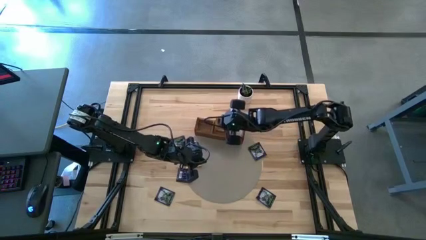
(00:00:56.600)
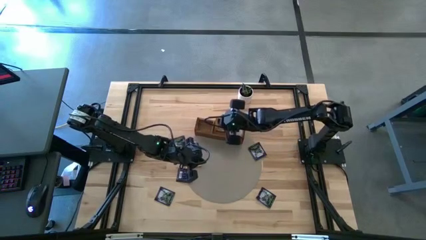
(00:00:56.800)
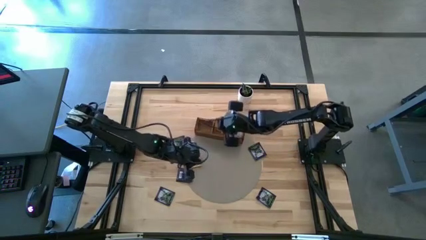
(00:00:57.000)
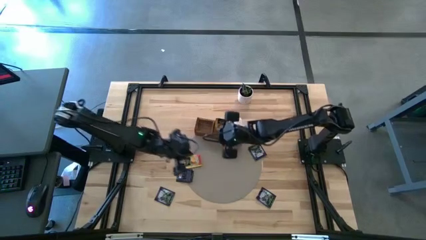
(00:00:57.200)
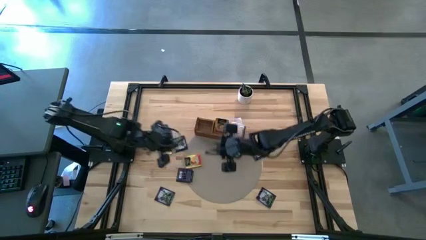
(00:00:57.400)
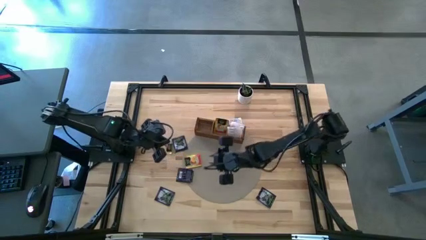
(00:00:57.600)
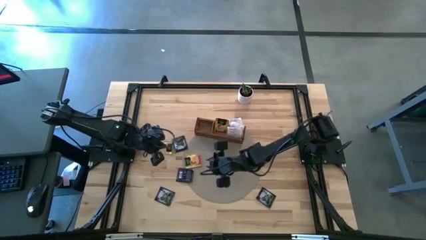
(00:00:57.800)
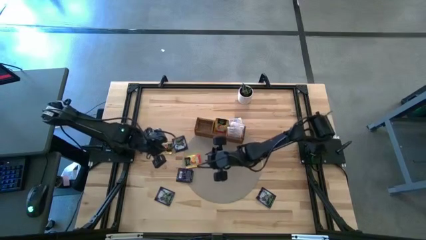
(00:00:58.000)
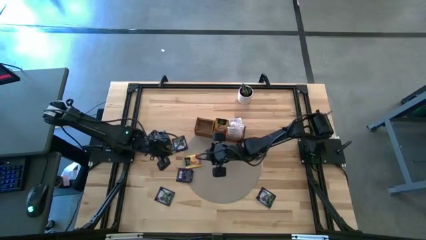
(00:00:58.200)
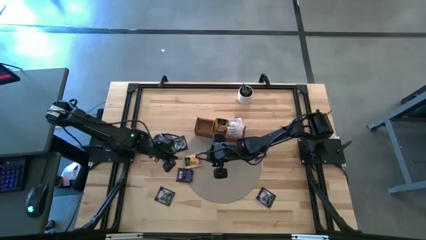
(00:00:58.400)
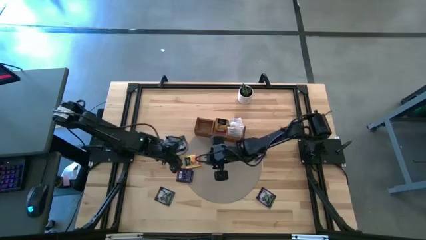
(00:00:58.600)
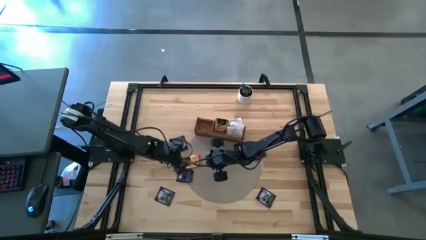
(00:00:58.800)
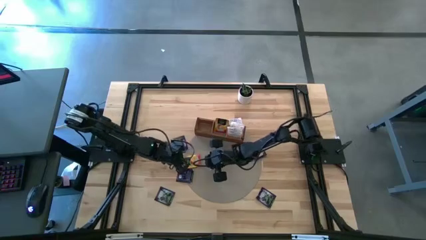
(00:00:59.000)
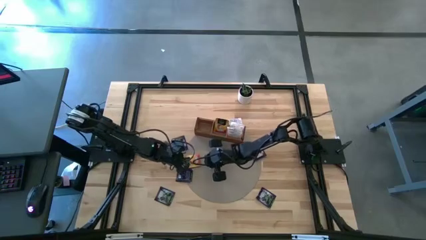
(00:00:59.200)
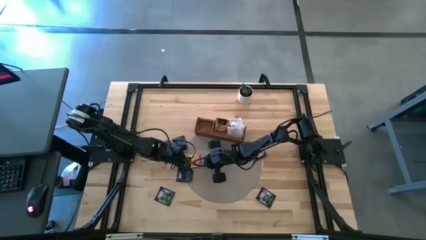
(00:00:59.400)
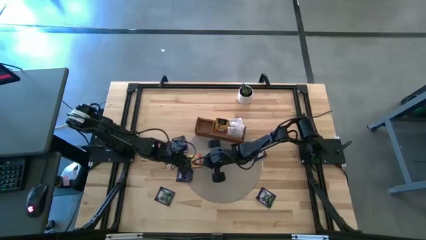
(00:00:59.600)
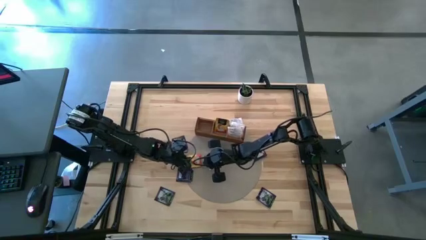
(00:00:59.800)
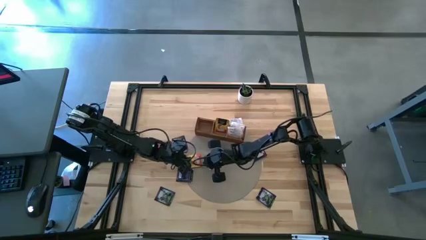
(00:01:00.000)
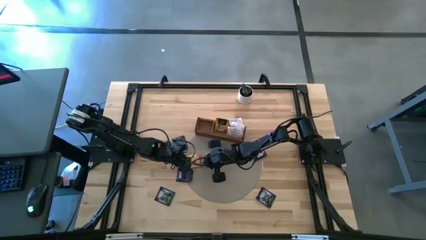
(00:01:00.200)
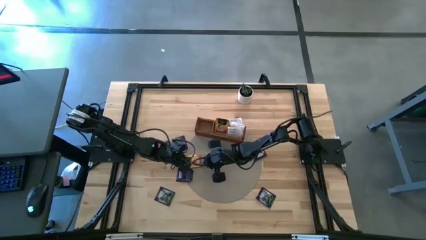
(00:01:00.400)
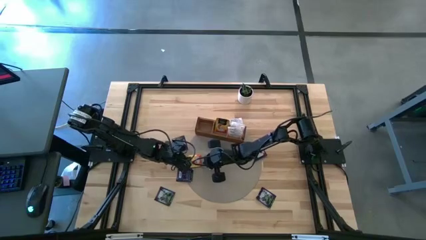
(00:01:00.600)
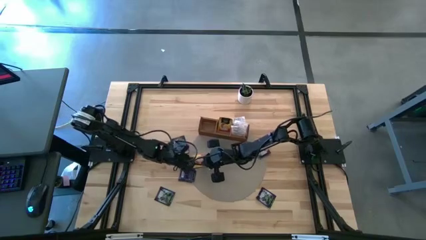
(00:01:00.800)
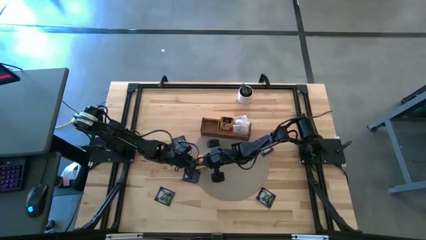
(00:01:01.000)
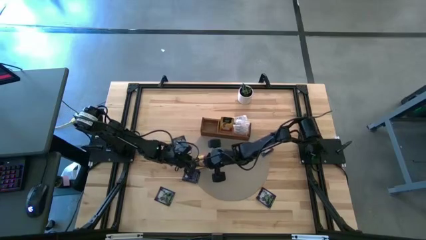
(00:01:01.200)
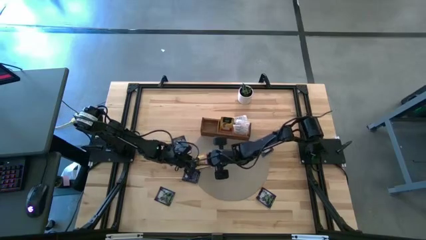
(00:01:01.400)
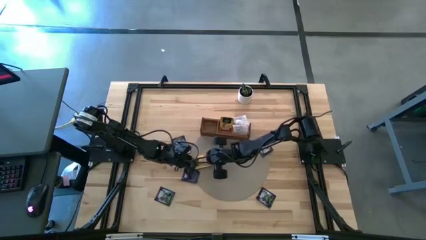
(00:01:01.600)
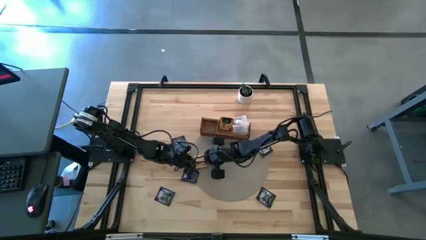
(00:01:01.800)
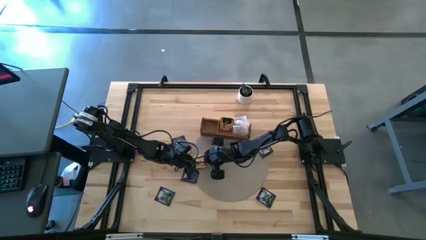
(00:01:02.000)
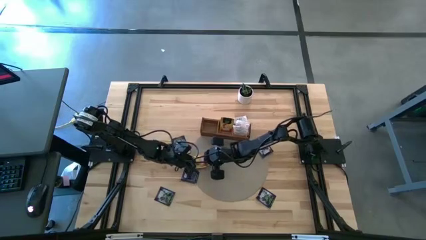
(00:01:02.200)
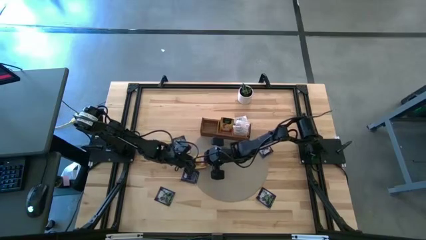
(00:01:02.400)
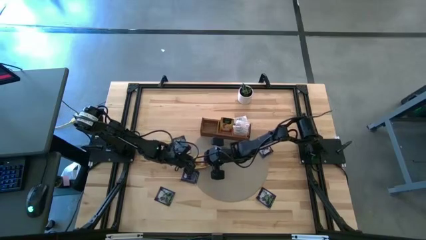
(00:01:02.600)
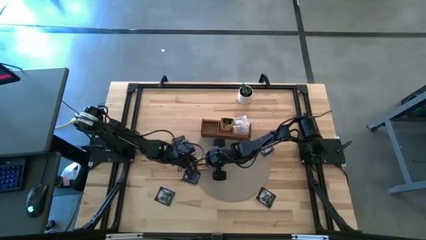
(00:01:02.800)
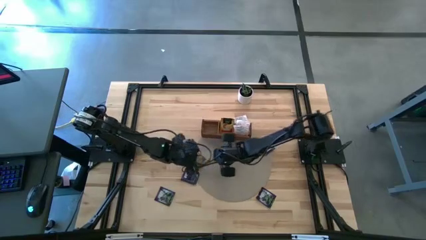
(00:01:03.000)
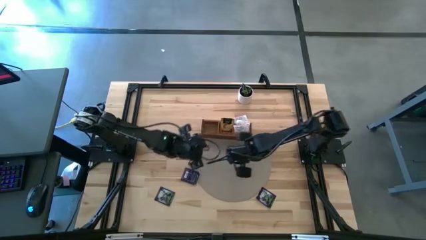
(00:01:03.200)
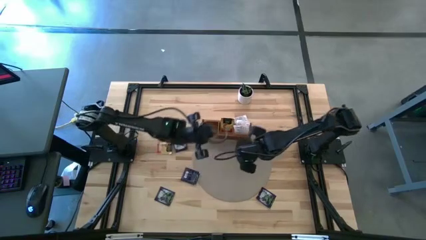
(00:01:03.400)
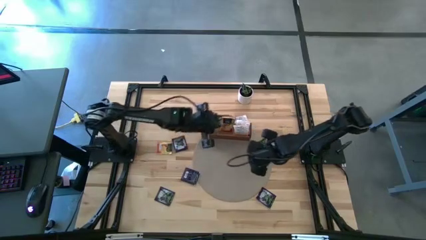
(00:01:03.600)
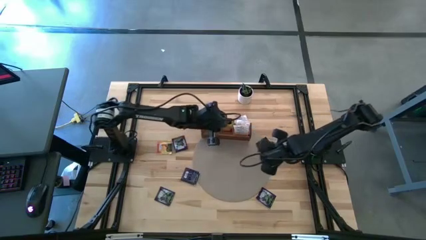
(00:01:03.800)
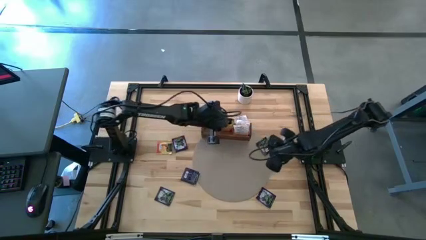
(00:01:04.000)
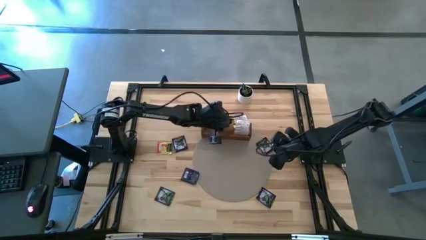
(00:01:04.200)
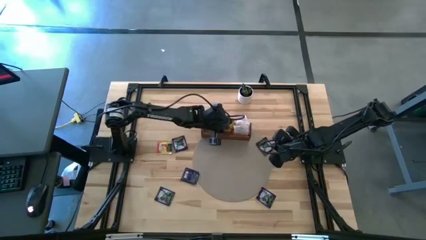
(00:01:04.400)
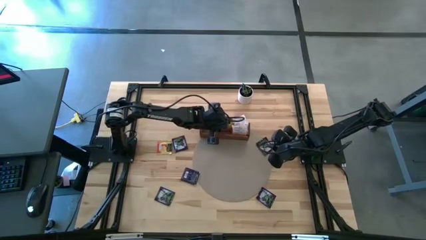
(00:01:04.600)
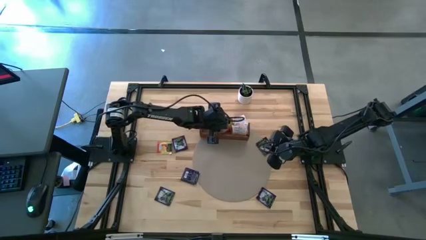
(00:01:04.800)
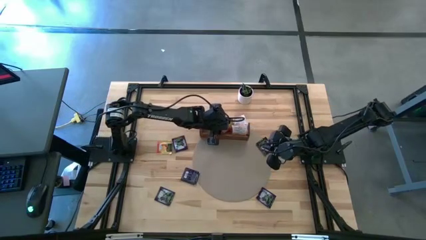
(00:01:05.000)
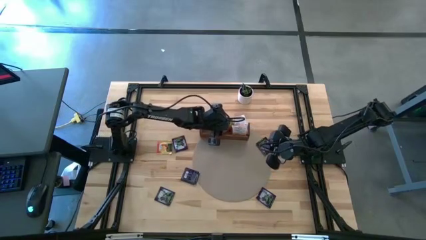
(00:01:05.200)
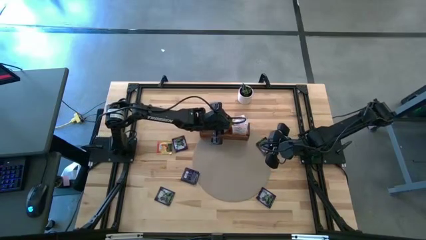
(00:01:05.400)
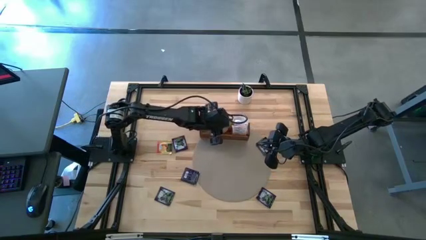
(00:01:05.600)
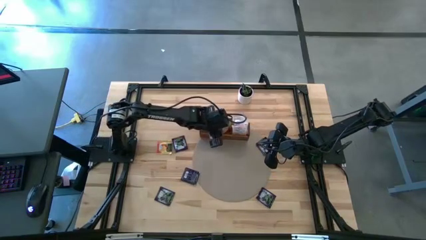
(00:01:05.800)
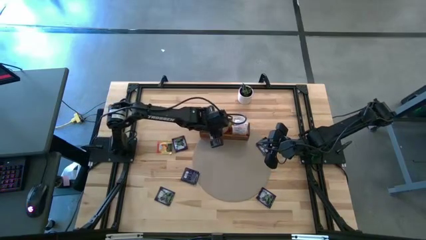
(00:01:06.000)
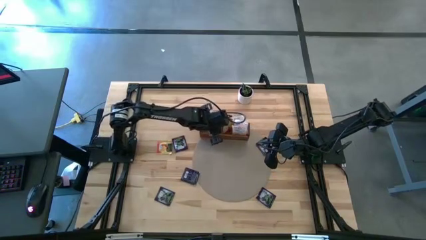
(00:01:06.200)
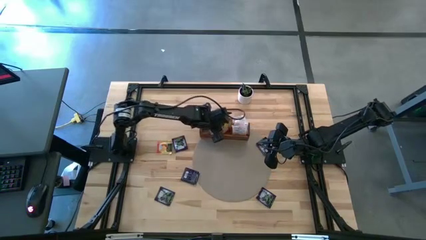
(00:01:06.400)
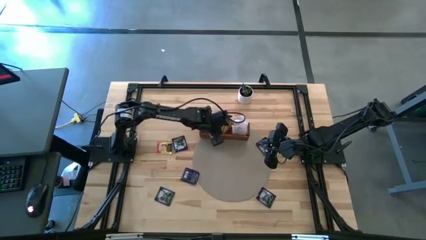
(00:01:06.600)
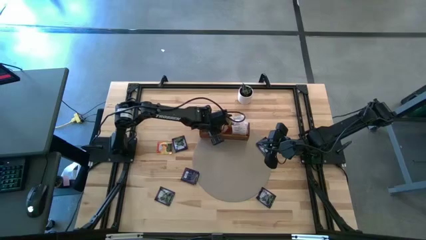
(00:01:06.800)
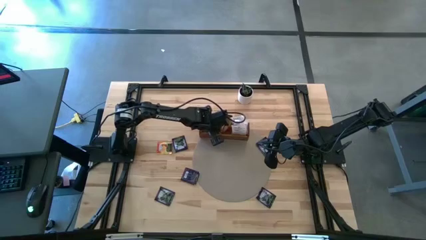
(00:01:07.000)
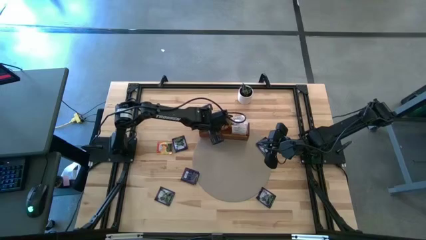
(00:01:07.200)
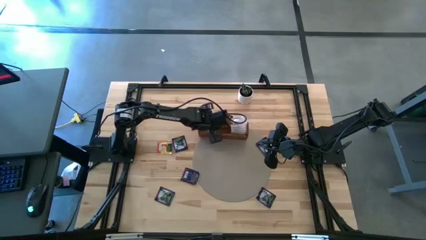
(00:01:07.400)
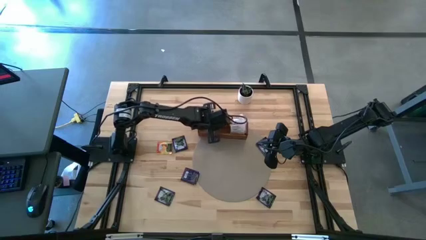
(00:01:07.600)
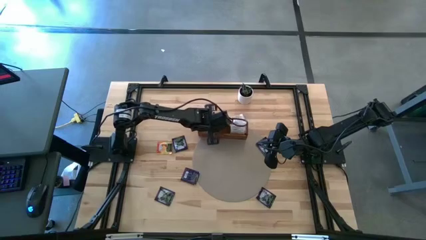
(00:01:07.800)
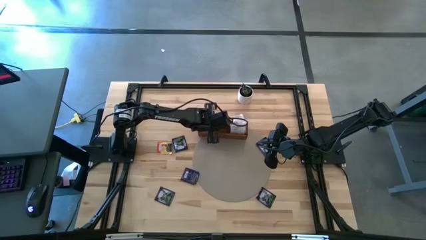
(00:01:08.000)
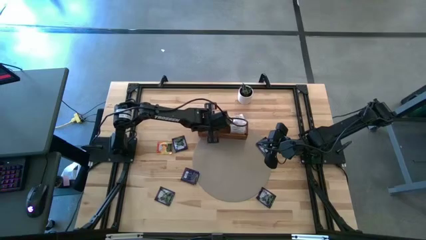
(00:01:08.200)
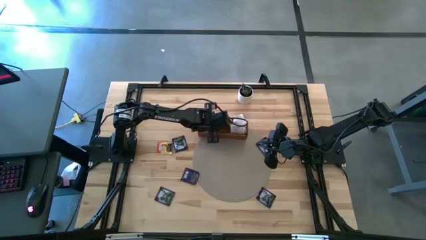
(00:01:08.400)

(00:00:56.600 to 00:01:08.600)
Task: Pick & Place Tea
Put the yellow tea bag into the middle section of the wooden organizer

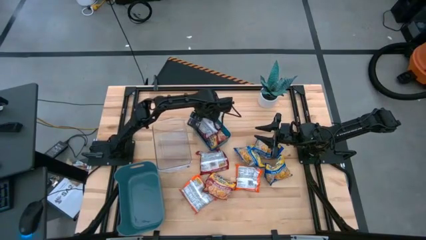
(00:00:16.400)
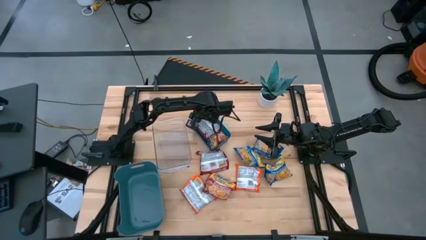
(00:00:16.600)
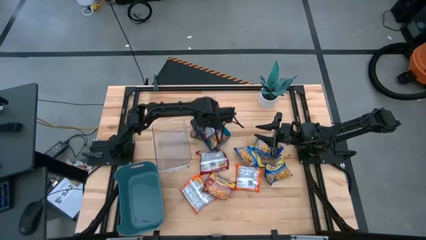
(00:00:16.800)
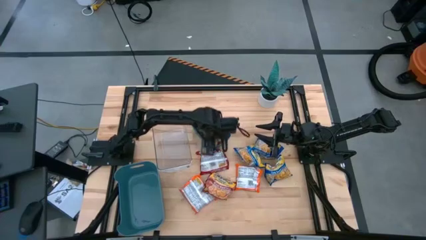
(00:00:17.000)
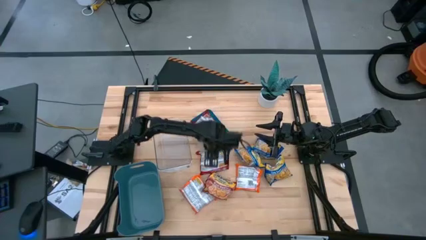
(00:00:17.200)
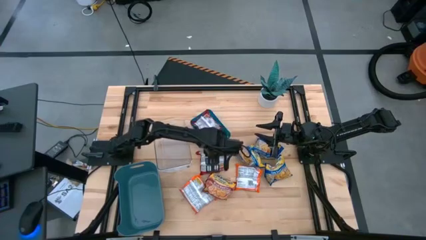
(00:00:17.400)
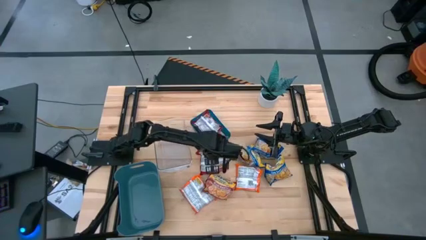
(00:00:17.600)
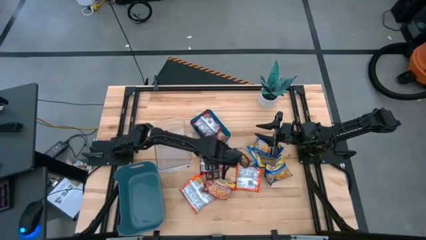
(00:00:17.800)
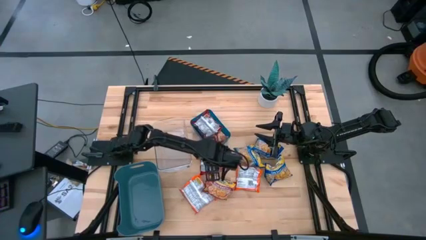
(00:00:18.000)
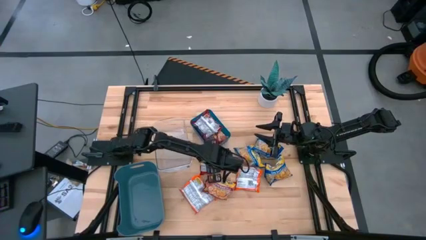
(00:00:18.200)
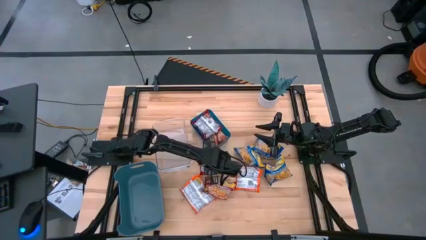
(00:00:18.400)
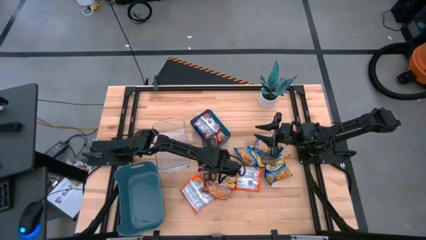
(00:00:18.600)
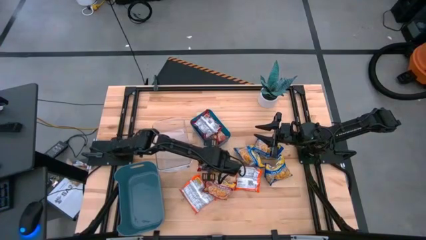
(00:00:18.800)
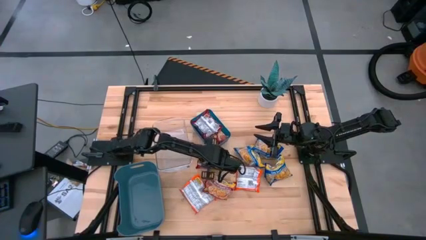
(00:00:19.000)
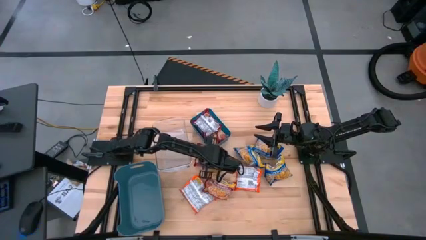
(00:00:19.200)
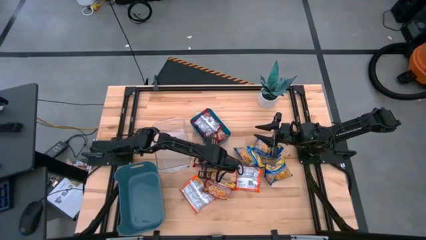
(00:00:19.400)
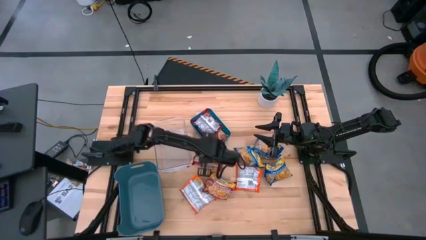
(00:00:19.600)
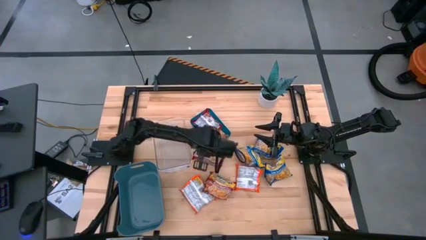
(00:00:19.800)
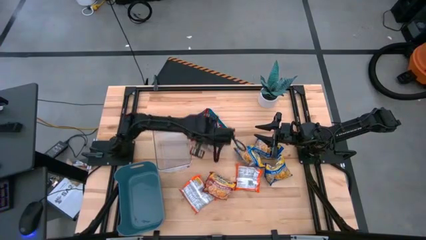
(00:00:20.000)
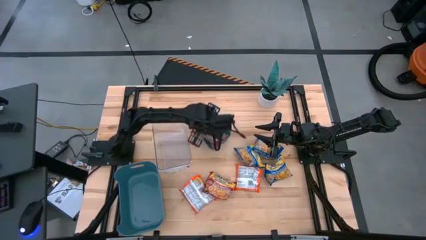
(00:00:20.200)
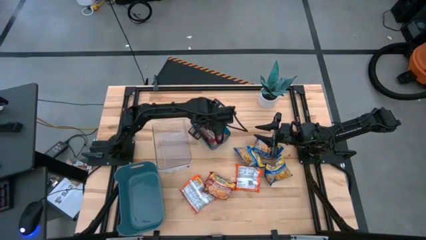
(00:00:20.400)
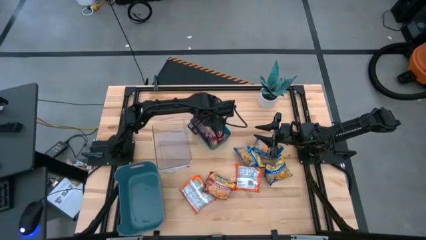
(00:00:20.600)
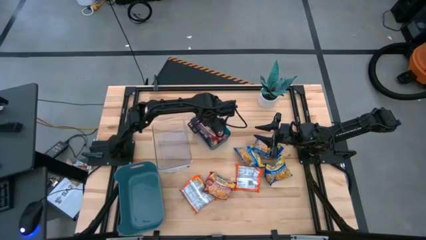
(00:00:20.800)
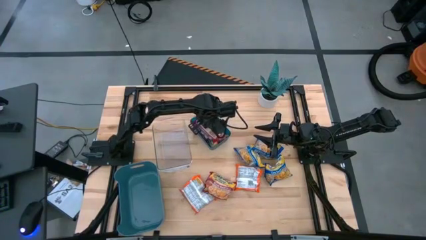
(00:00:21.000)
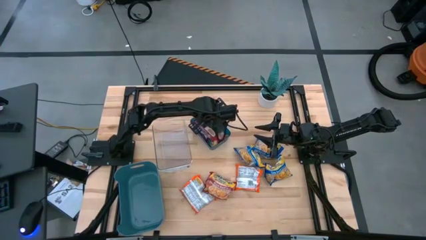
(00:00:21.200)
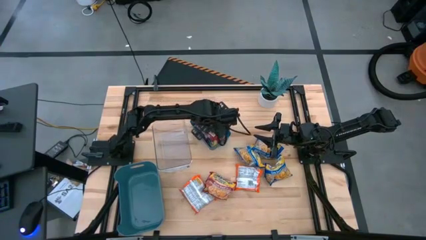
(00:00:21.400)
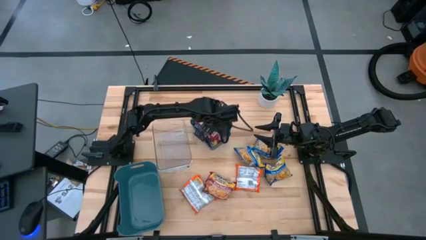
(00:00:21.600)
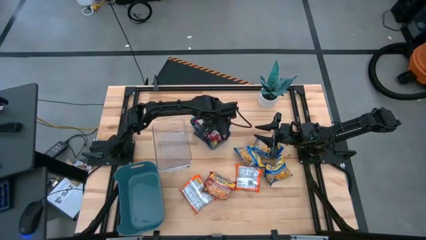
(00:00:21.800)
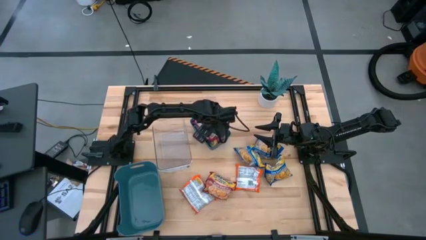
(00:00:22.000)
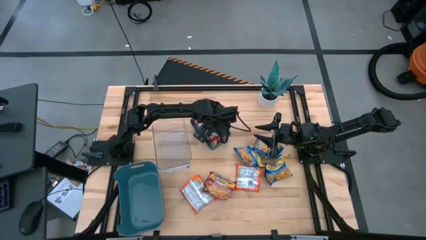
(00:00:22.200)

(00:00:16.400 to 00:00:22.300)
Task: Sort Maruchan noodles
Put the red noodle pack into the blue bin
